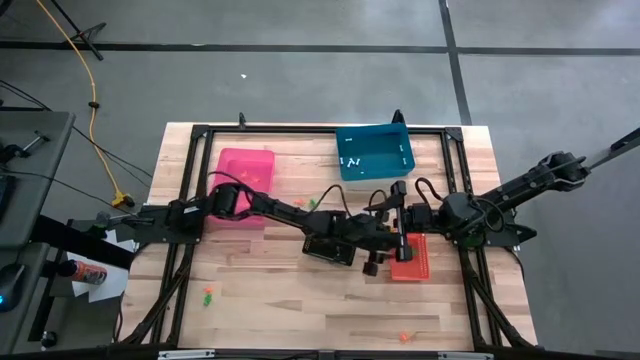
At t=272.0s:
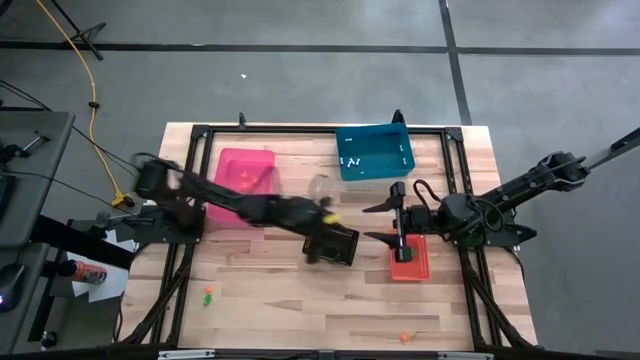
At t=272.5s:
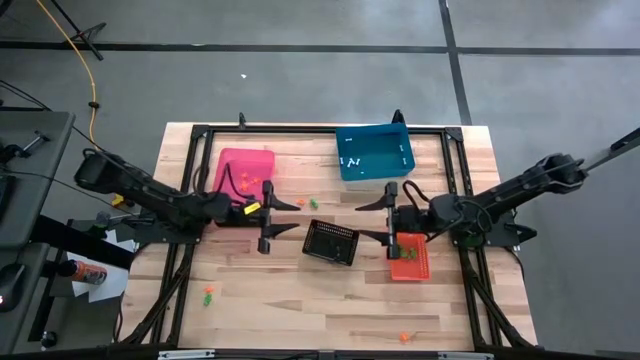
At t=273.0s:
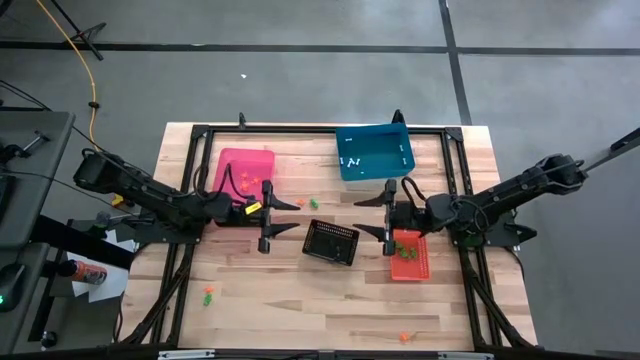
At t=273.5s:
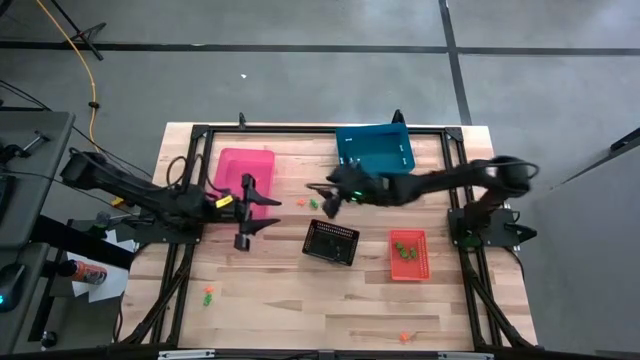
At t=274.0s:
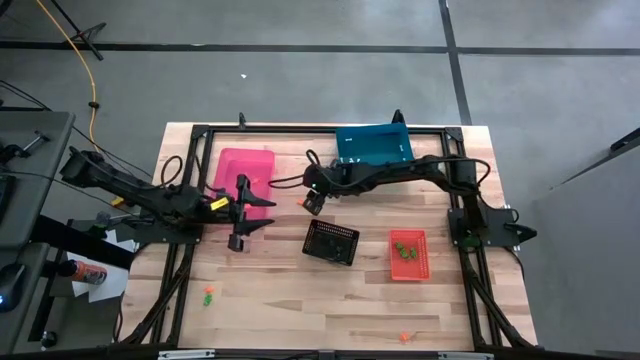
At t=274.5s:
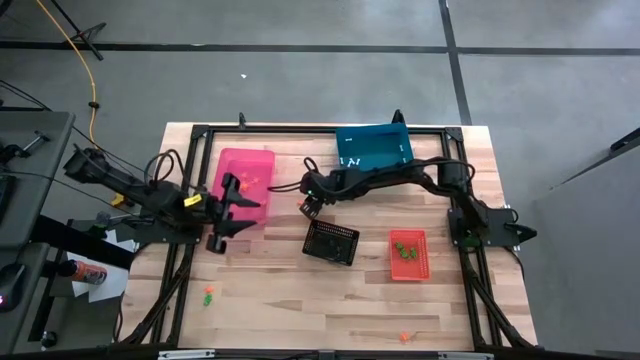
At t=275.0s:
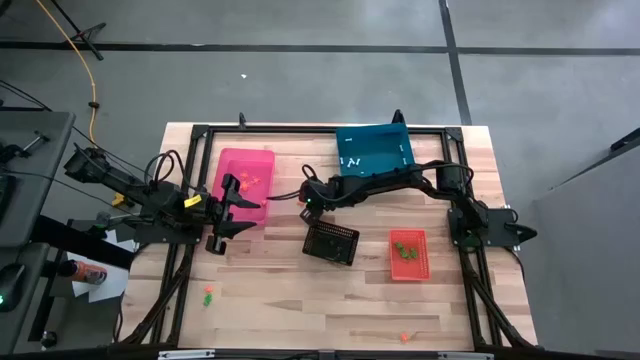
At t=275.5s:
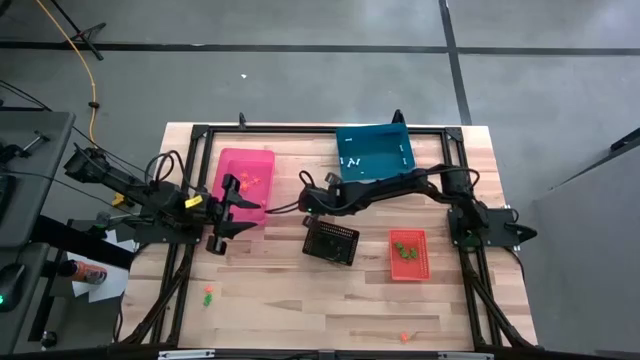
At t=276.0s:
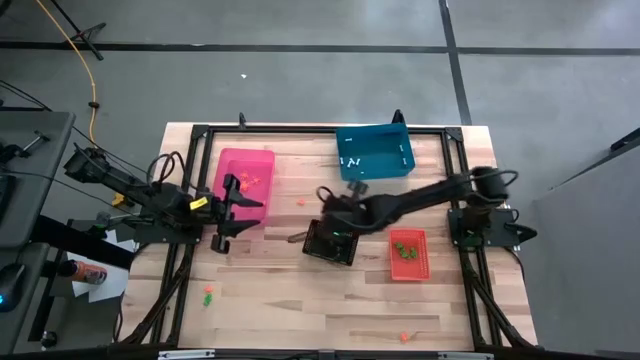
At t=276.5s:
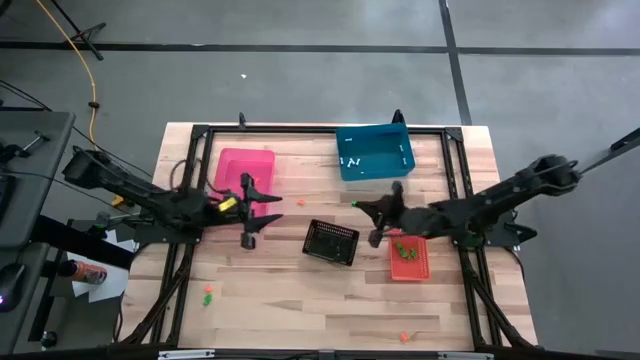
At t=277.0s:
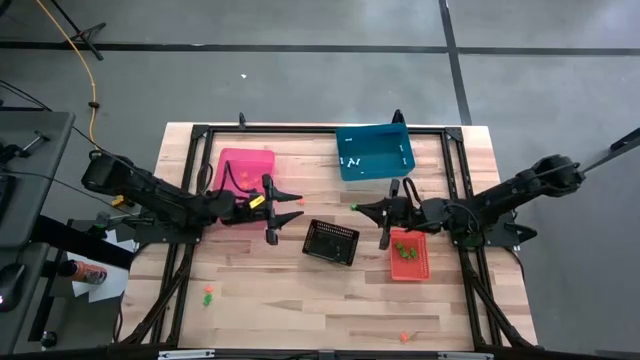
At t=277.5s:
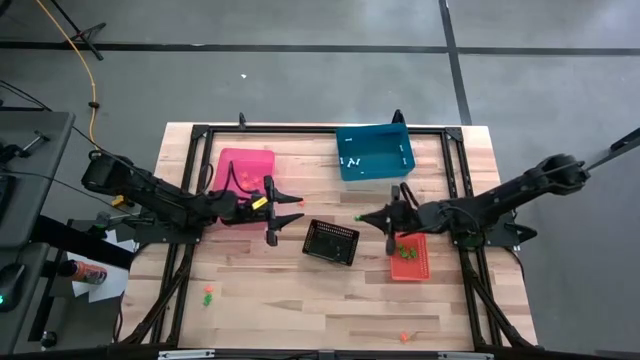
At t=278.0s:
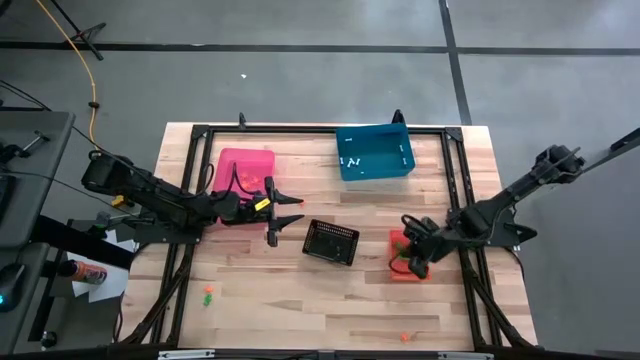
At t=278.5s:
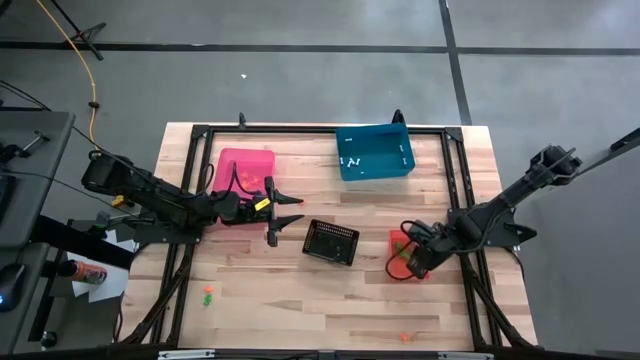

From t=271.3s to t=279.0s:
Task: Sort Halloween decoration
Put the green skeleton toy into the orange bin

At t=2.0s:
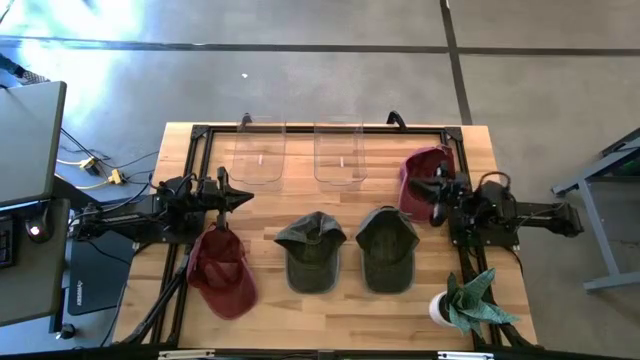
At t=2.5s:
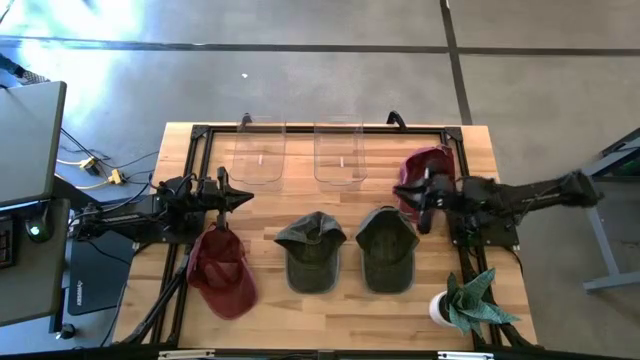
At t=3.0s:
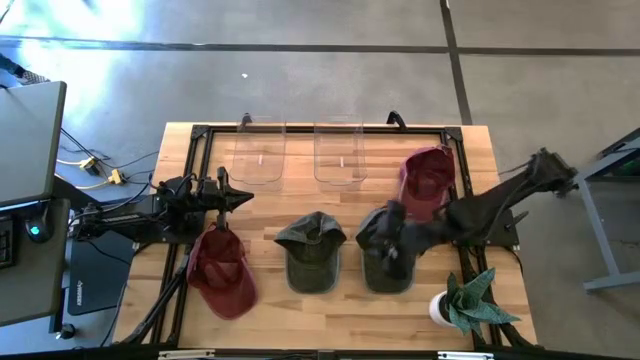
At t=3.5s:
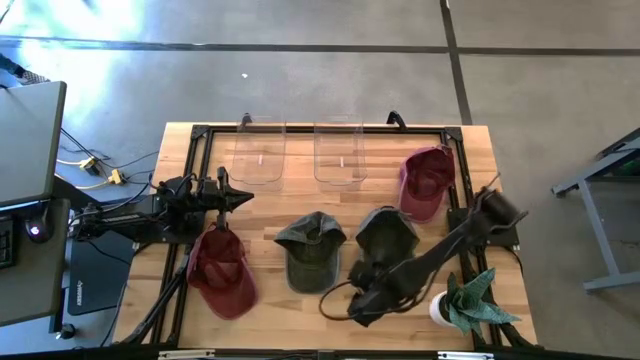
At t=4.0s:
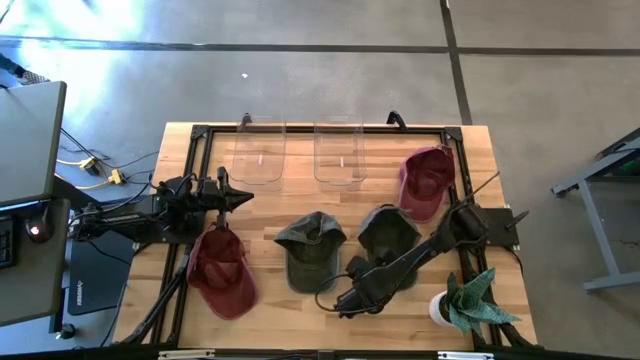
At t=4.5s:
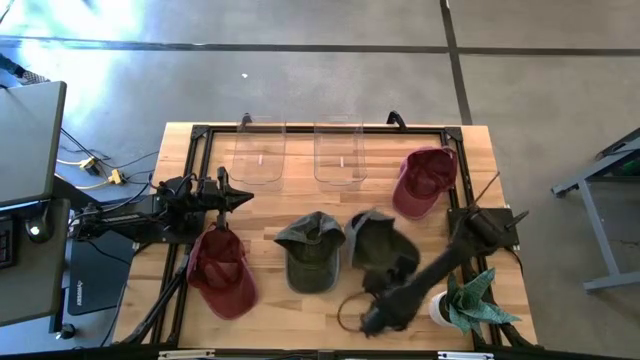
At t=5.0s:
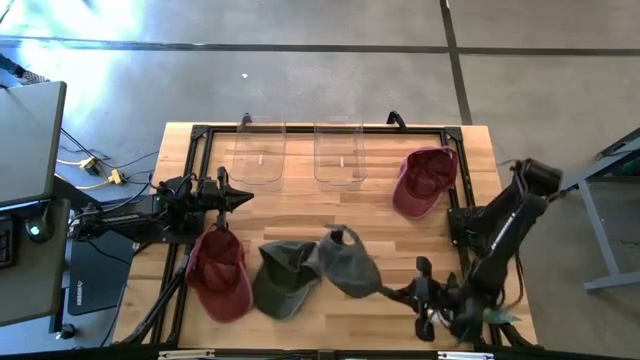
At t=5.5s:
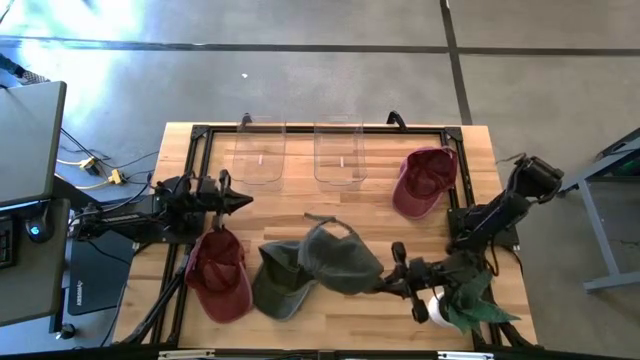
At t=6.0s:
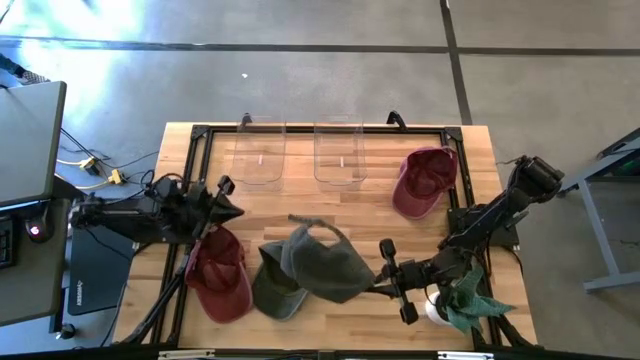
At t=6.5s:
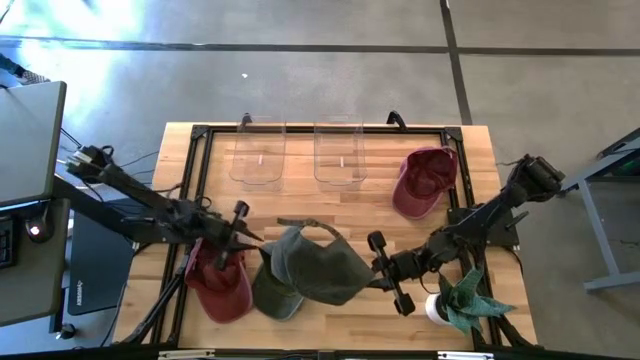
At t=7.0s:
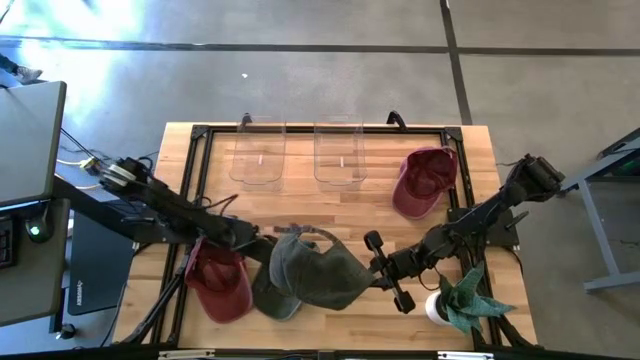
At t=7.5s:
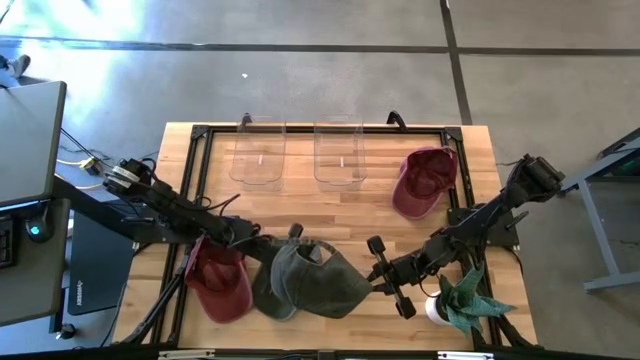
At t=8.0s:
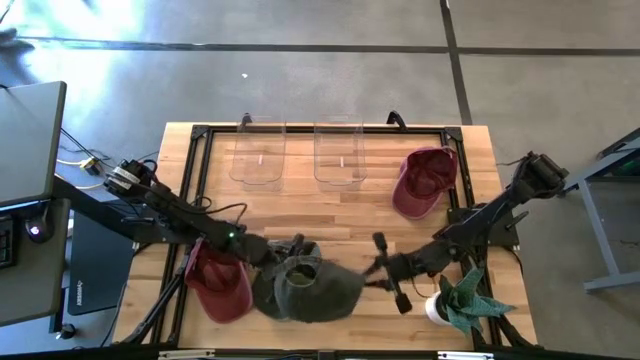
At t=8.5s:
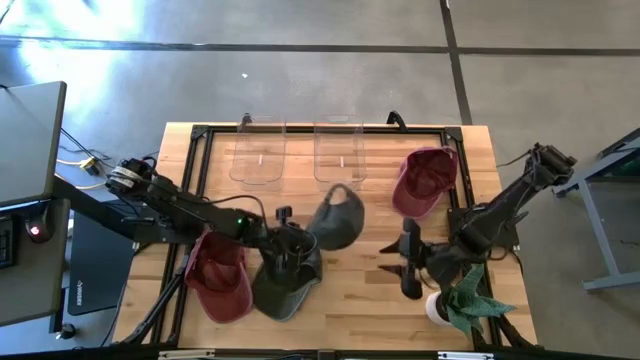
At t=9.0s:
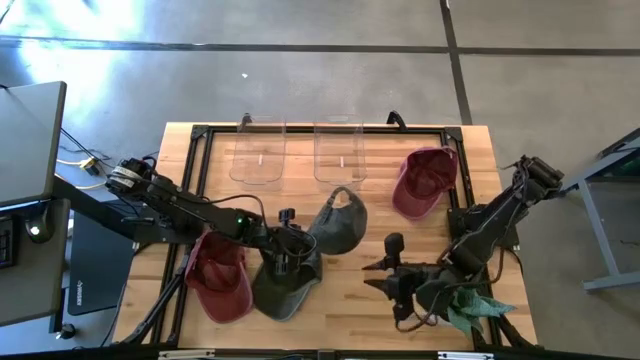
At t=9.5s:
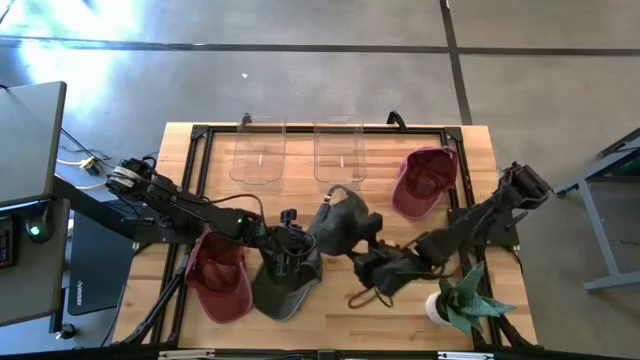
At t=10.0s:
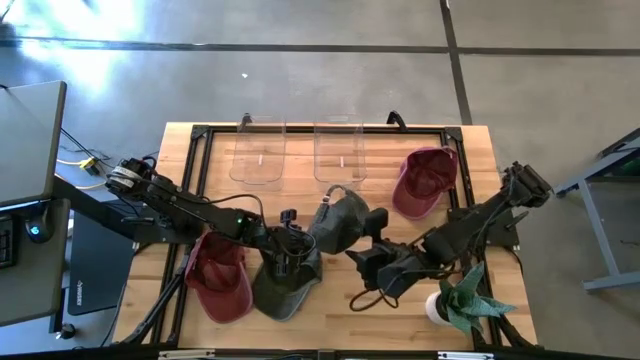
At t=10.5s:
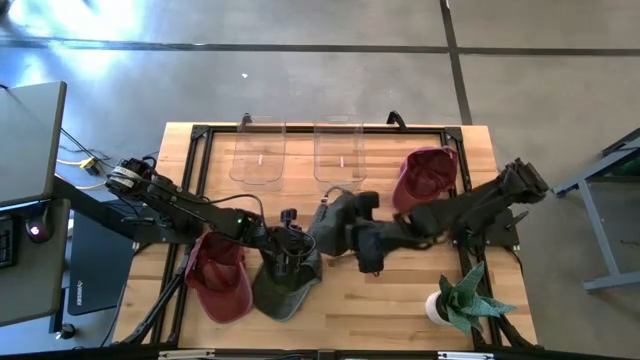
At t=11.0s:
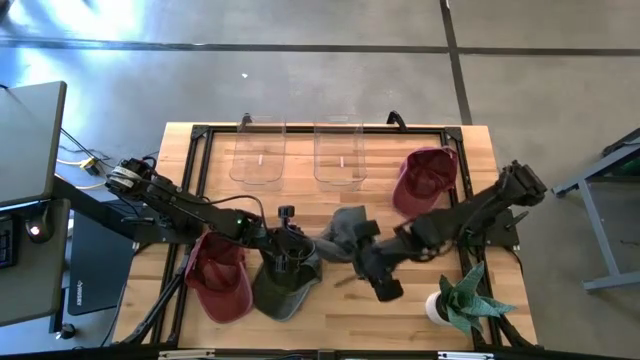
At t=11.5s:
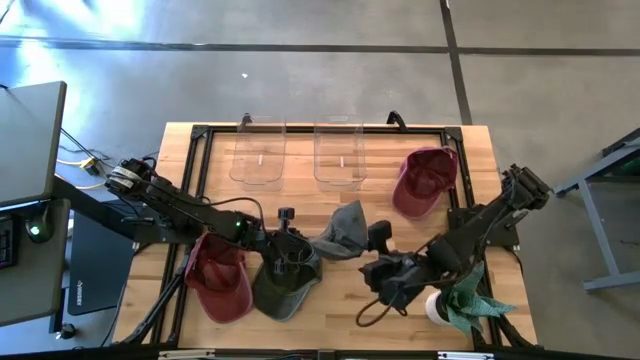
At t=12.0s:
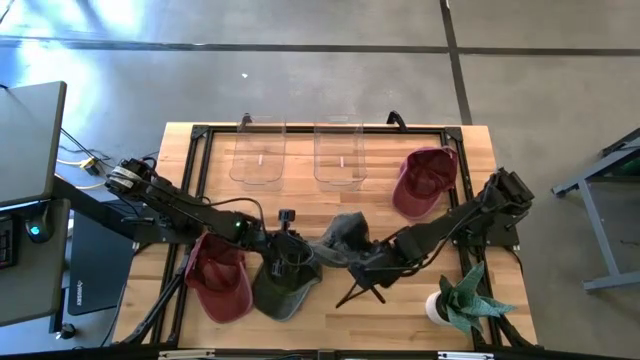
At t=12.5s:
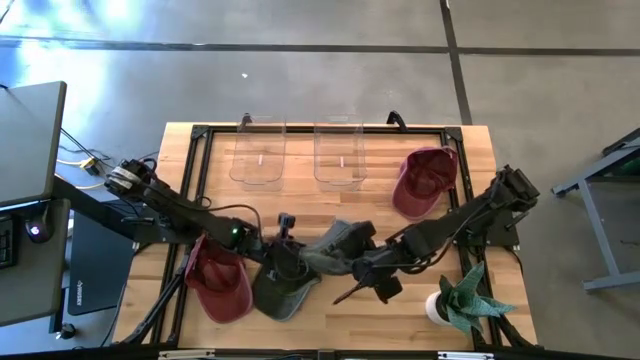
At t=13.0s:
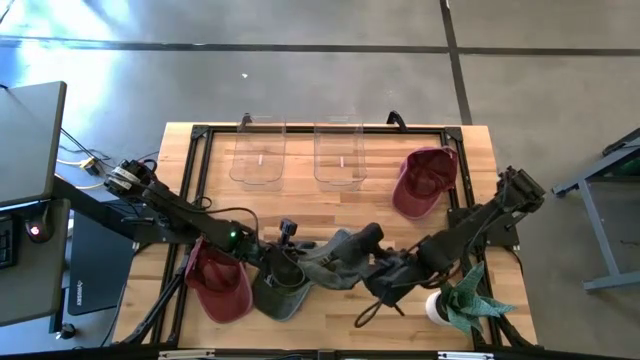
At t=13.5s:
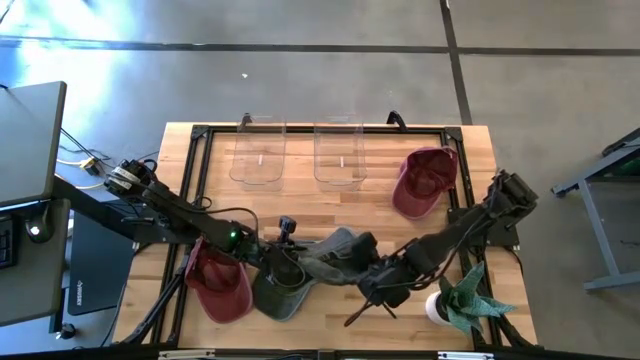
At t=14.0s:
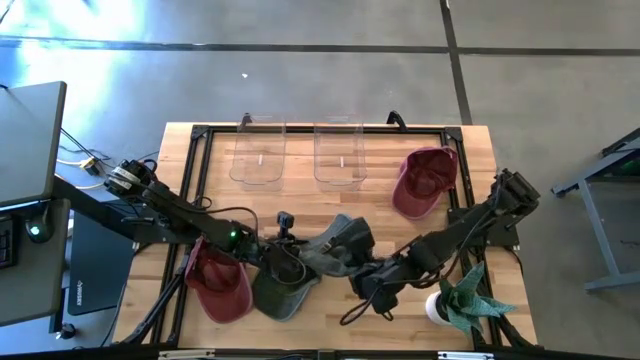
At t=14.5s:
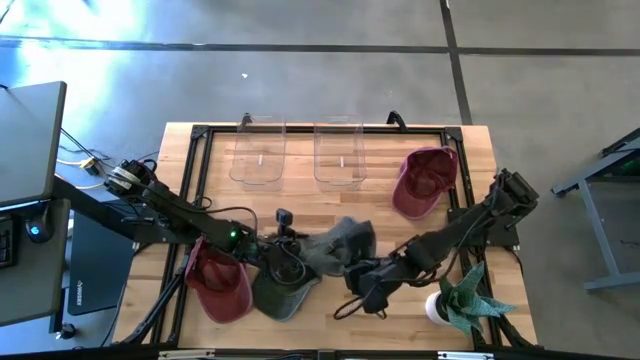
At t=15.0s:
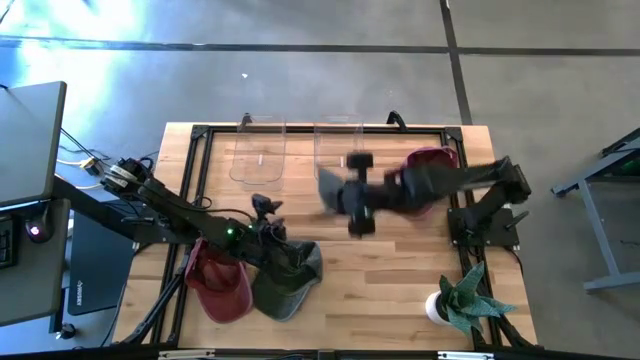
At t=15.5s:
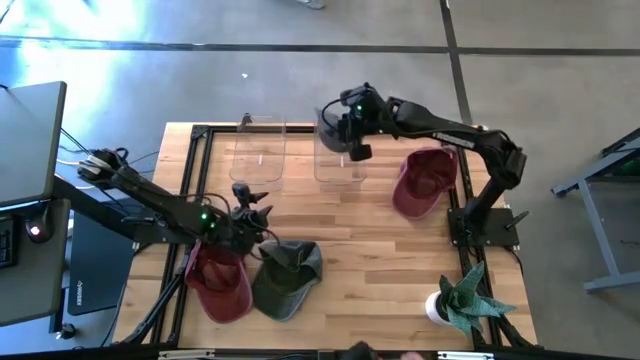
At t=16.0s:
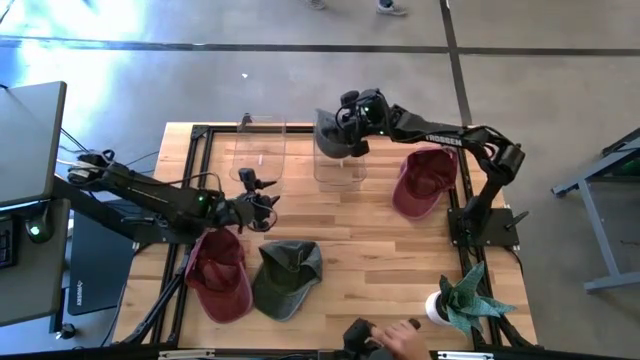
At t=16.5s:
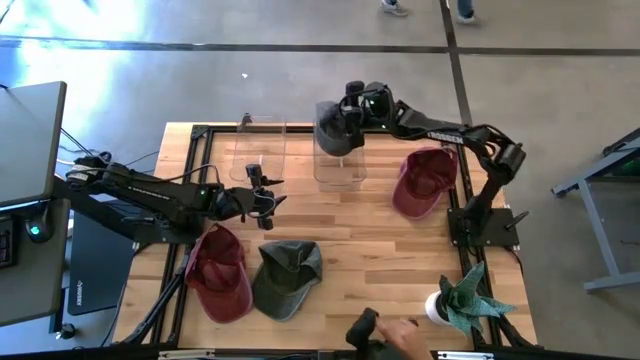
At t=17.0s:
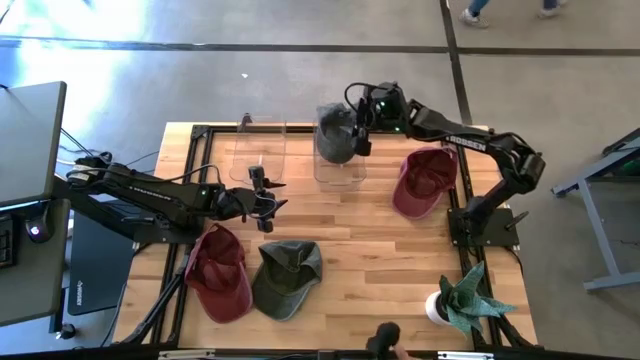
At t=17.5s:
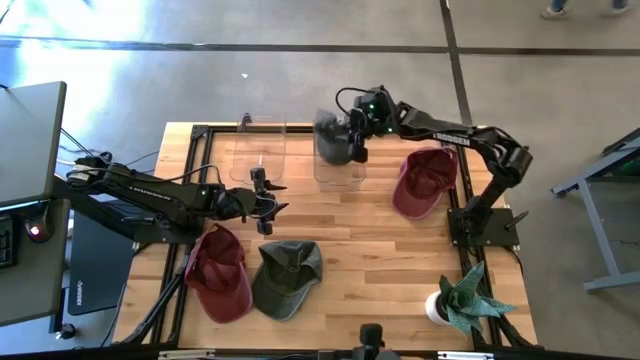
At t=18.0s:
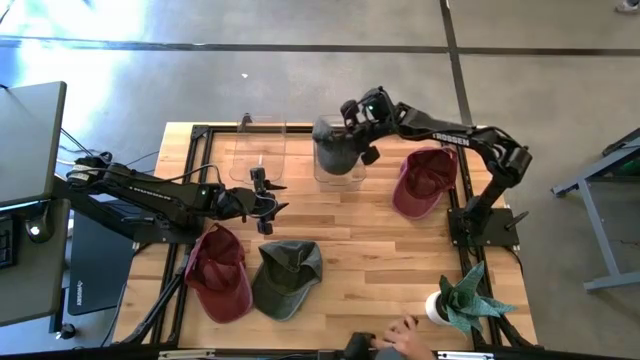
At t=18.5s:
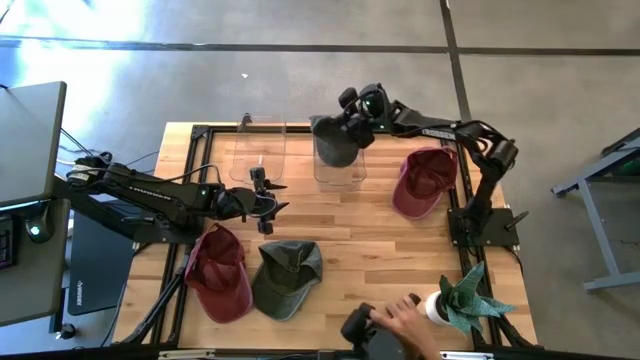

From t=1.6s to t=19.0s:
Task: Pick & Place hat
Put the right gray cap into the right transparent bin
